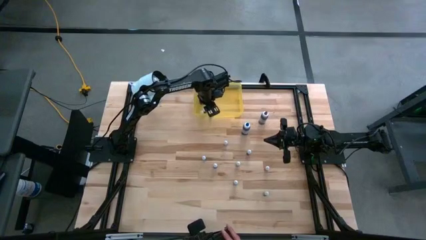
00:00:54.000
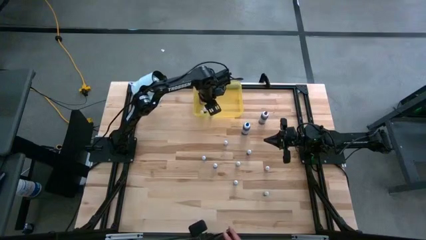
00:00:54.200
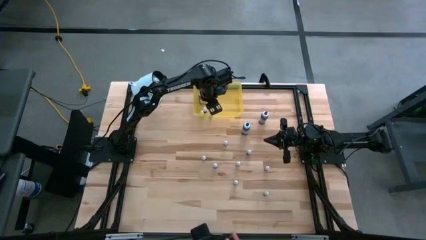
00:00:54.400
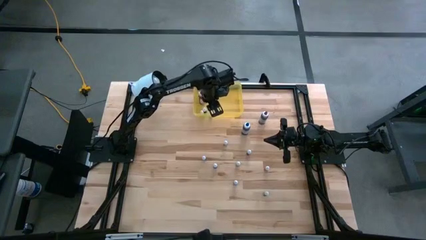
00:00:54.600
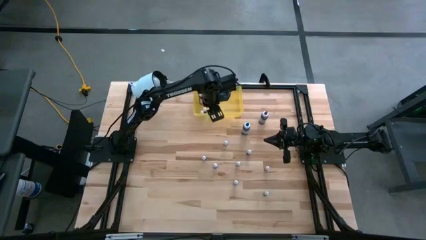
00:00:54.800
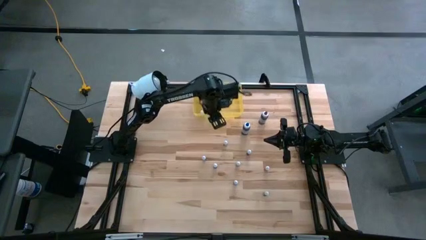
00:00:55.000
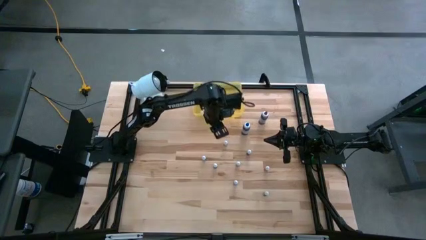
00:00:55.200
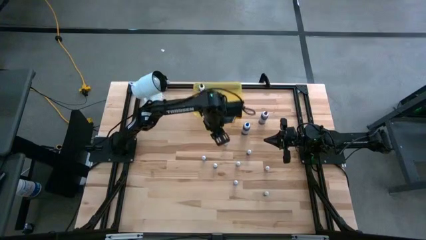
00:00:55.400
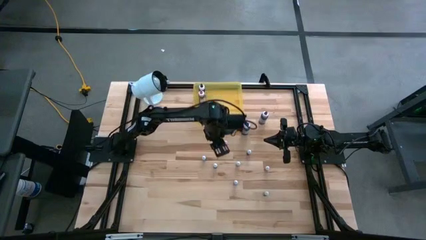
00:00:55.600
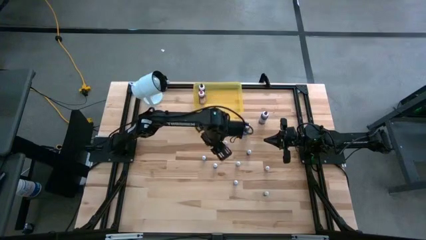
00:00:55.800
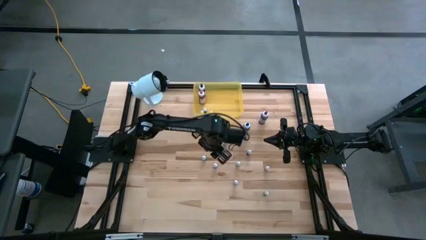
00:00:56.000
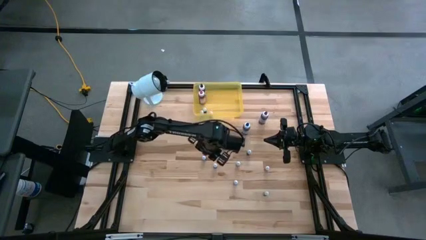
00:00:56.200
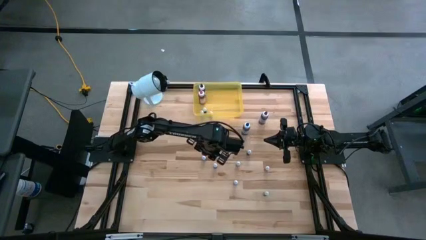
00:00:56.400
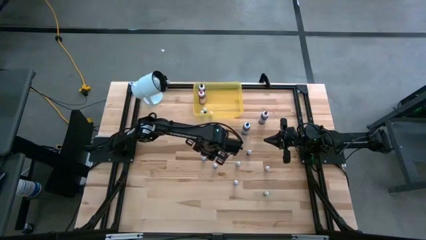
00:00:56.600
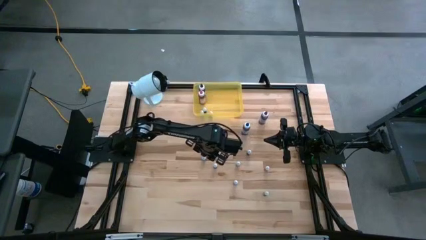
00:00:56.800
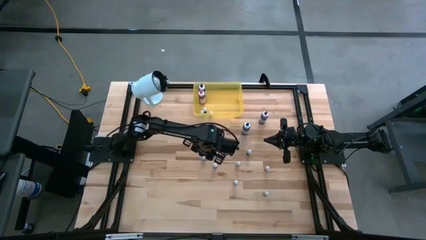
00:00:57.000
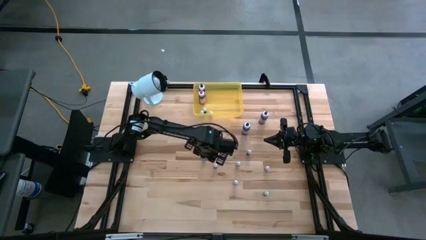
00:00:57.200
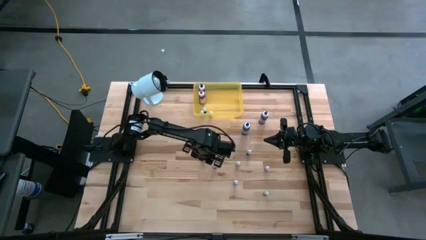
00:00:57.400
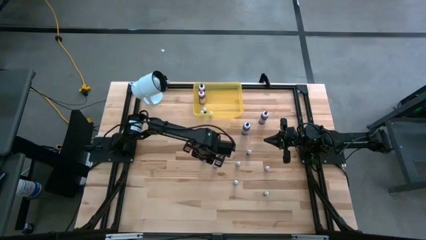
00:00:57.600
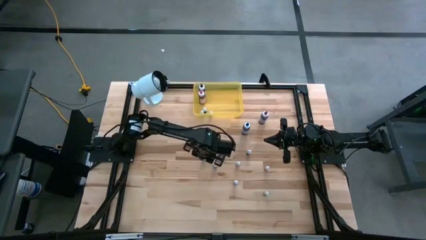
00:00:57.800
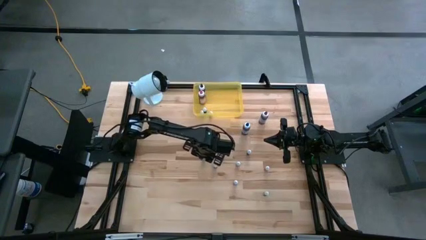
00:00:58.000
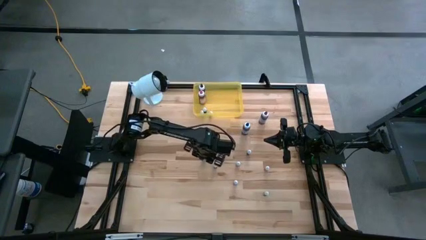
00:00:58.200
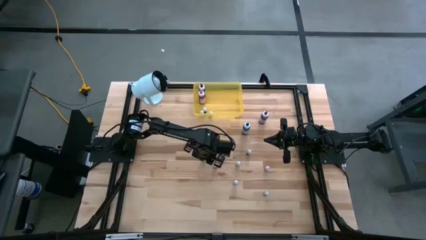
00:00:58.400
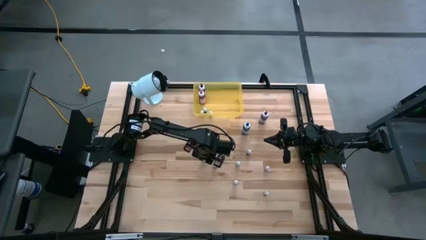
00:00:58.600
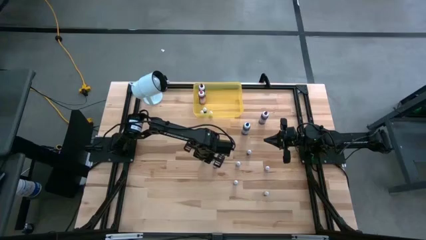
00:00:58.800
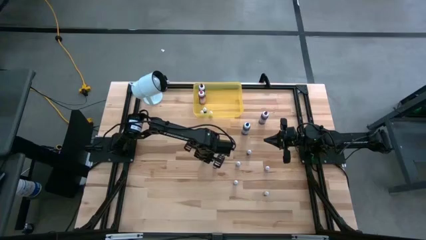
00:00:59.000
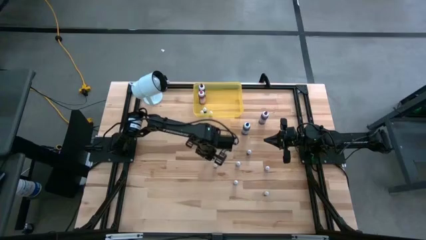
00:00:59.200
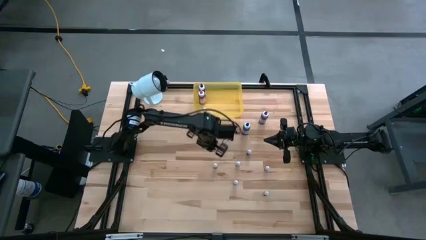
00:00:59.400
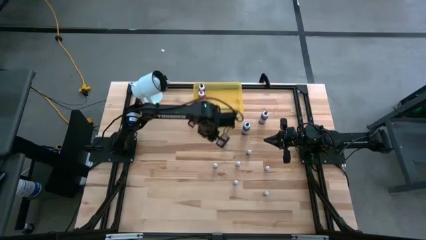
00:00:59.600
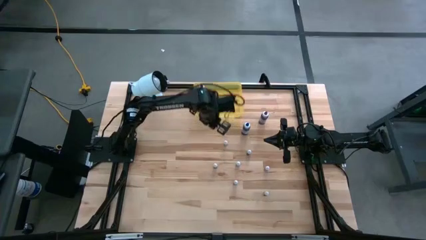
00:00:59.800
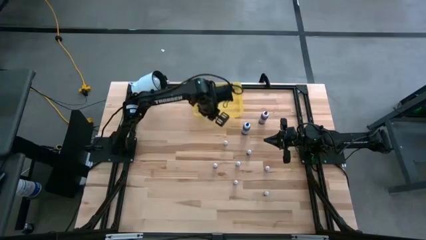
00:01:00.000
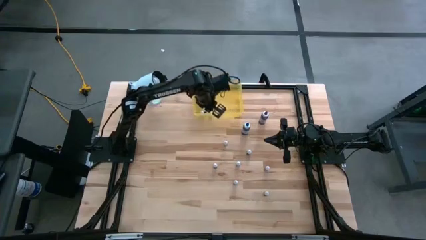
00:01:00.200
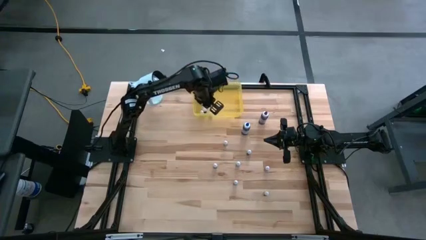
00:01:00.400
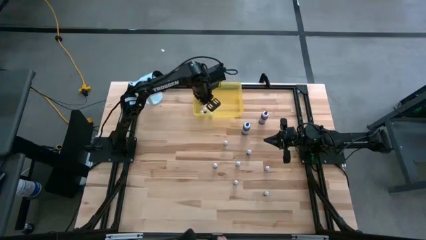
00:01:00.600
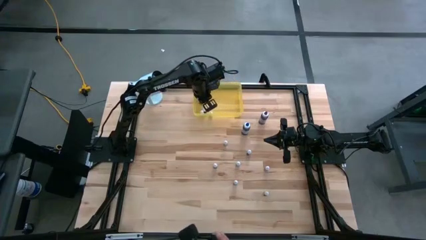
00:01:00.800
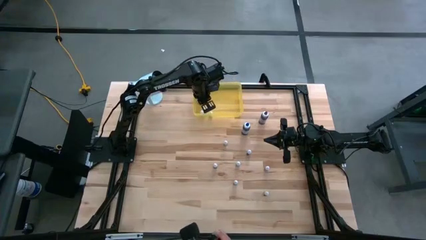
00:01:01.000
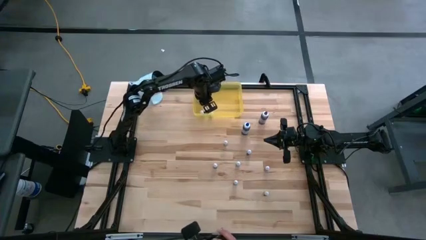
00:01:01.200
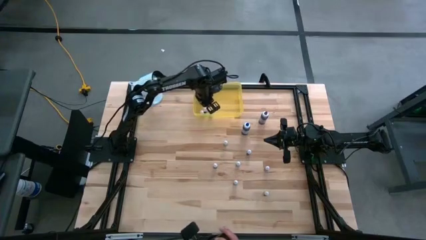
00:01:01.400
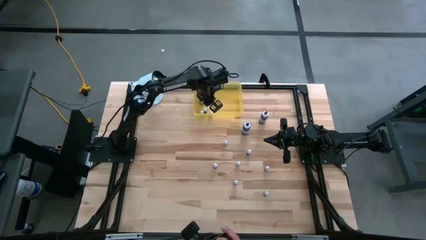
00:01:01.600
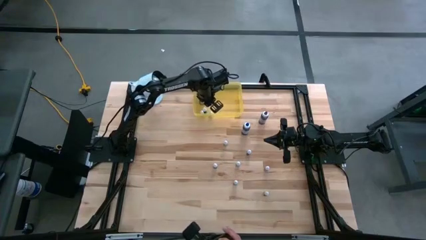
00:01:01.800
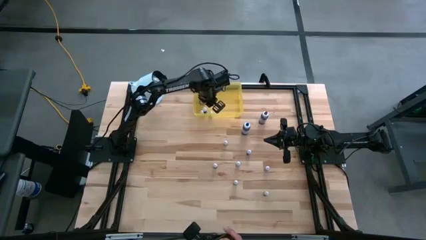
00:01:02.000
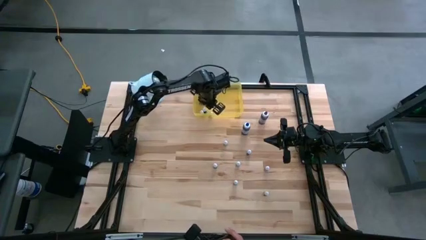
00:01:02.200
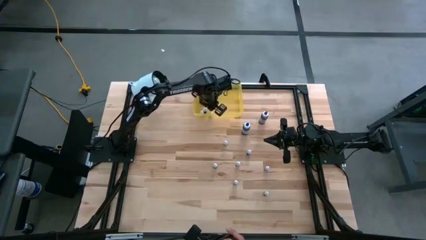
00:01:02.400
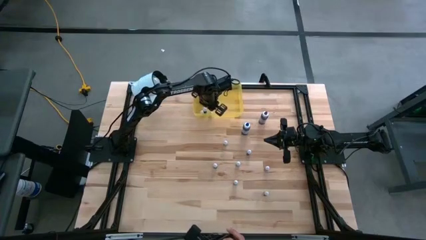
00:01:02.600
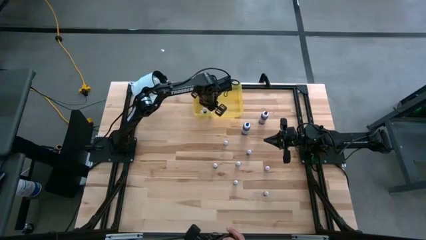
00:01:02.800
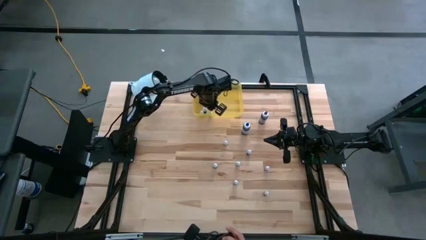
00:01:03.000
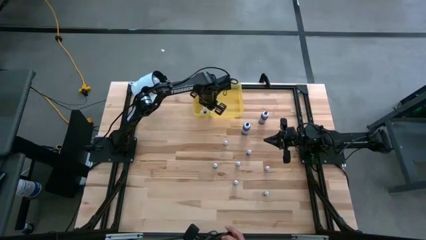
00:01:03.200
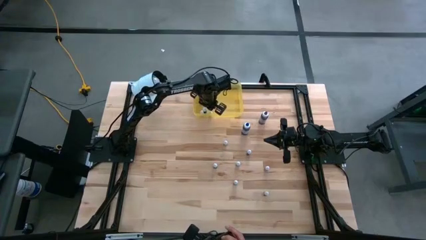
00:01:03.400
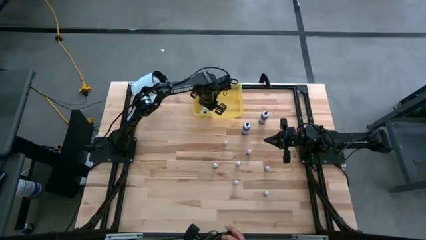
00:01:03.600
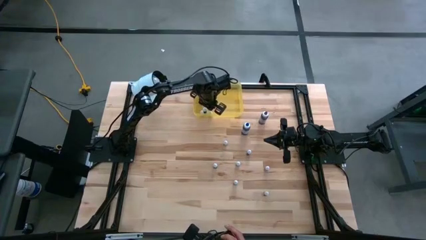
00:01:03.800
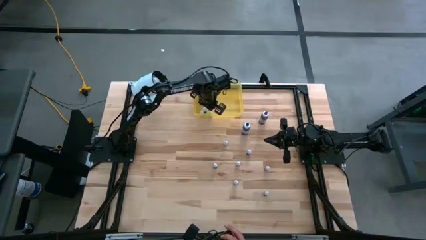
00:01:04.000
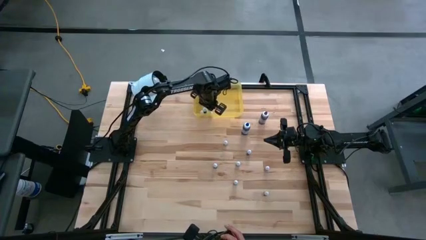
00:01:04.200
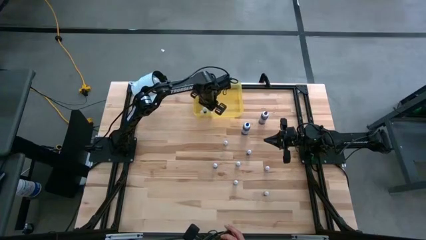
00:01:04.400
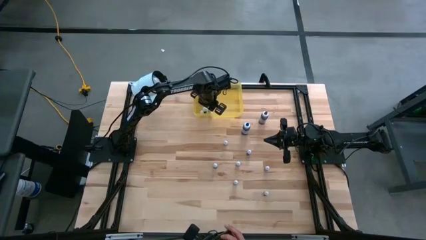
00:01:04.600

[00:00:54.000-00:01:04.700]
Task: Pick & Place food coloring
Put the small black food coloring bottle into the yellow container

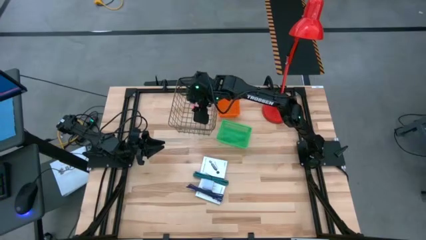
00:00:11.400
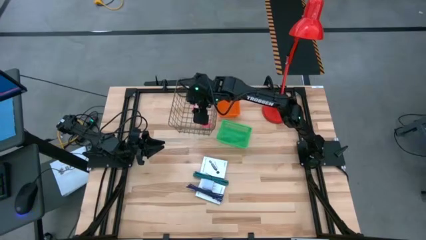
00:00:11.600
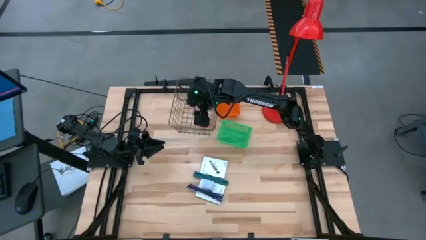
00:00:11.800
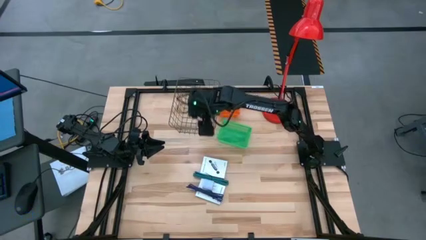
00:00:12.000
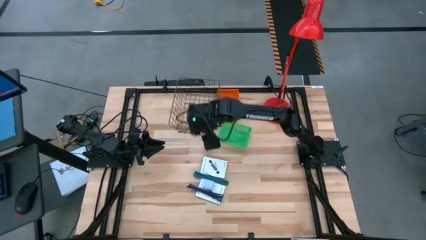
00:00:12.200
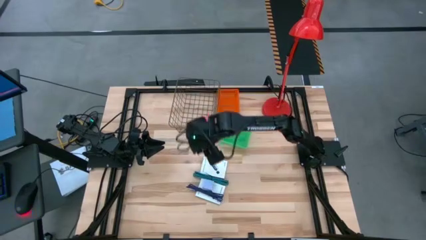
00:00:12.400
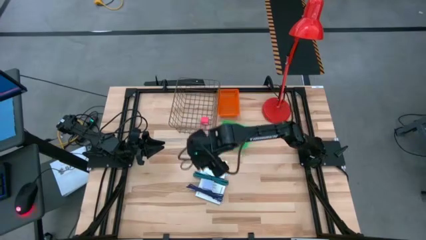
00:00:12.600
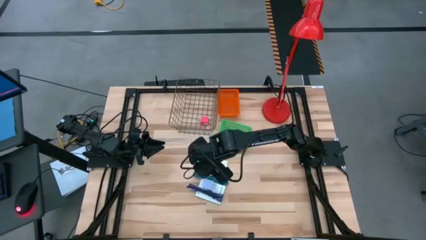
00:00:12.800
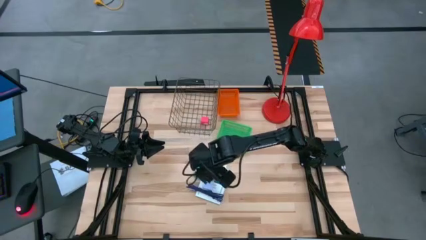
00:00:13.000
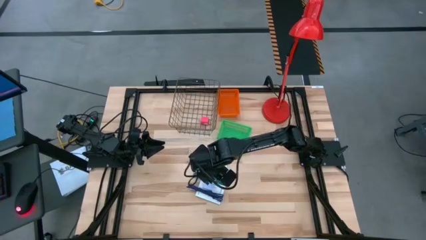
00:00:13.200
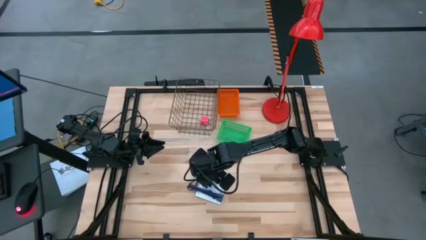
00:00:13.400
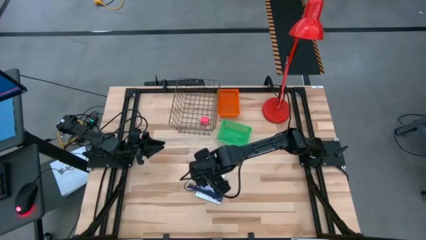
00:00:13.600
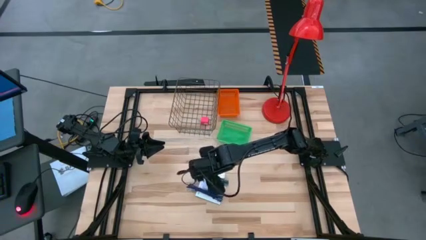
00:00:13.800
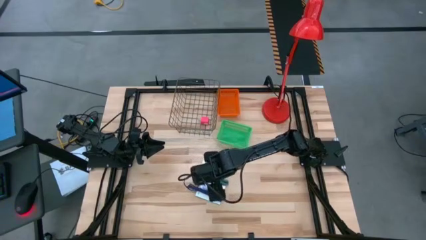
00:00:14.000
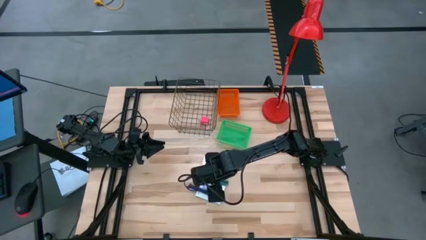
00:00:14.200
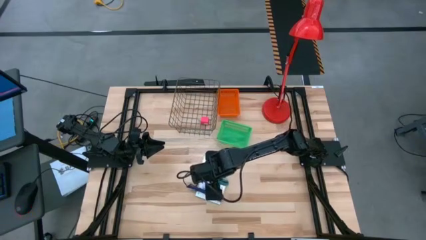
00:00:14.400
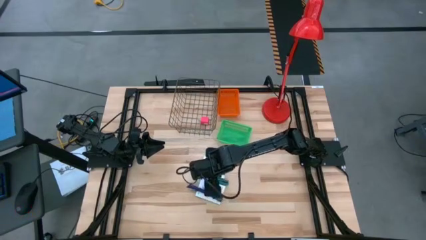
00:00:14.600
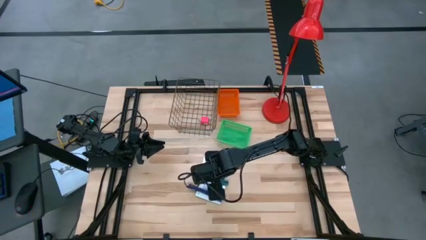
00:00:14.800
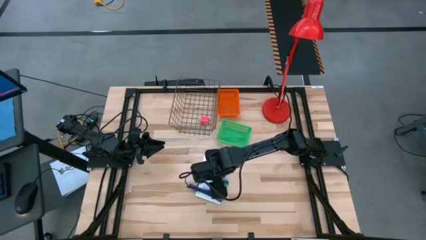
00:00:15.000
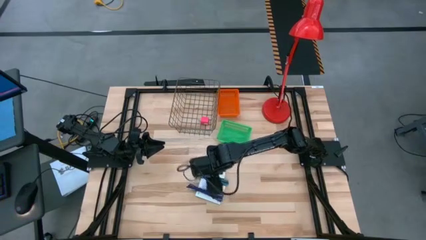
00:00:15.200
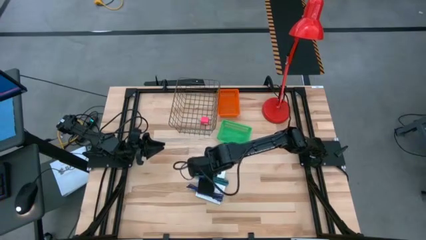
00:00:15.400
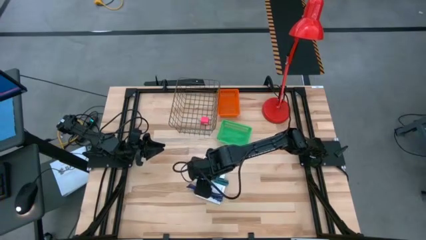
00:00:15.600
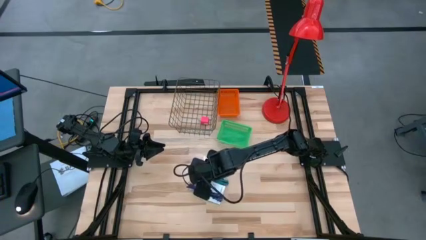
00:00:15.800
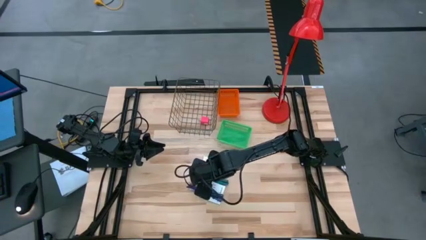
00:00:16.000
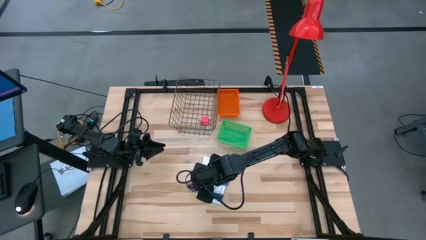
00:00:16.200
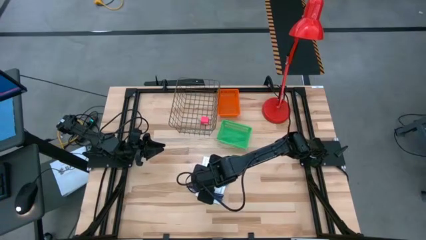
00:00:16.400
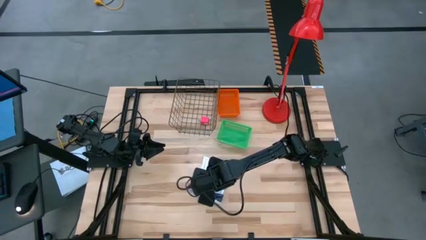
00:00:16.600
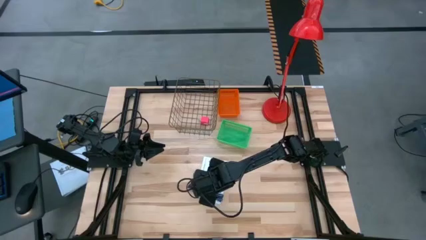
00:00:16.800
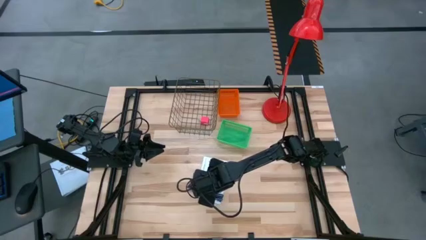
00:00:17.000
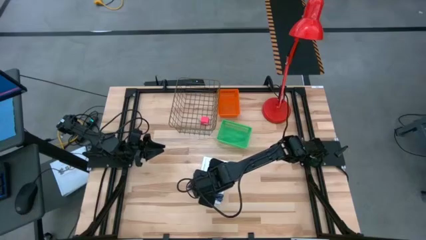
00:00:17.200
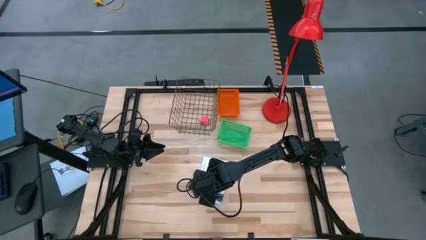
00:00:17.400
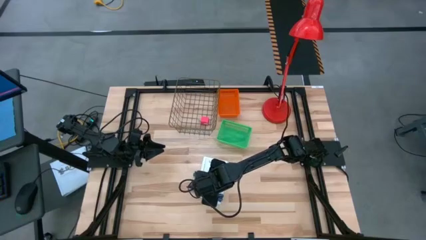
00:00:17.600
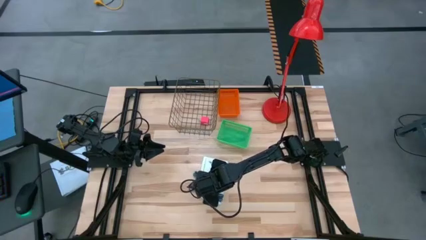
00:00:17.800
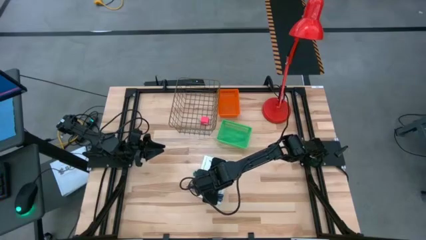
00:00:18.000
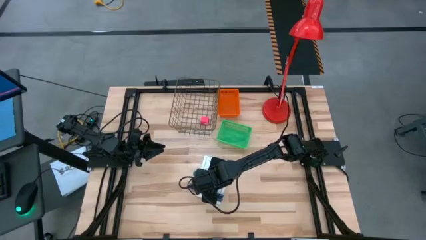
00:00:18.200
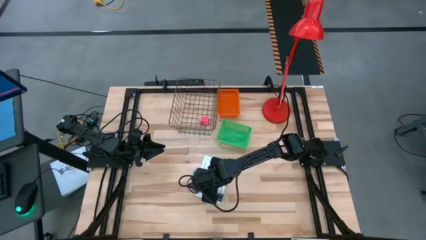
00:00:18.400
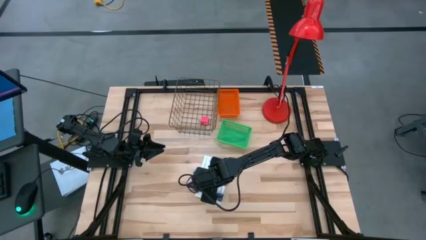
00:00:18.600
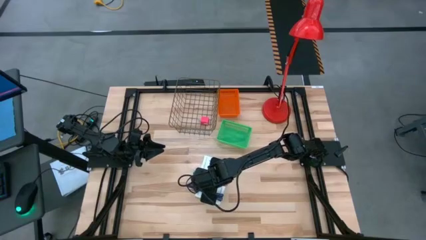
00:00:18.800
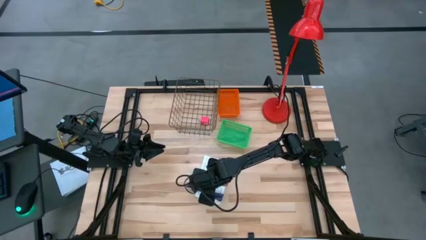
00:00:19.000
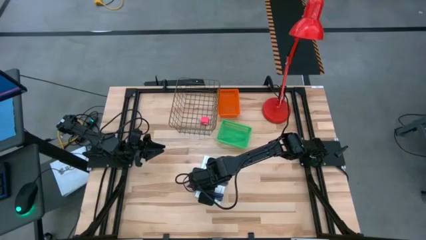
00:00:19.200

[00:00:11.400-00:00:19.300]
Task: Pick and place items into bin
Put the white charger adapter into the wire basket
